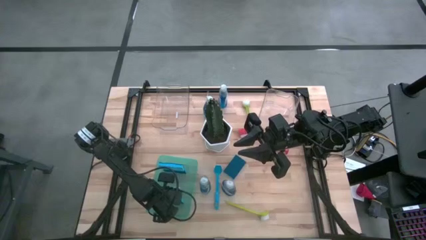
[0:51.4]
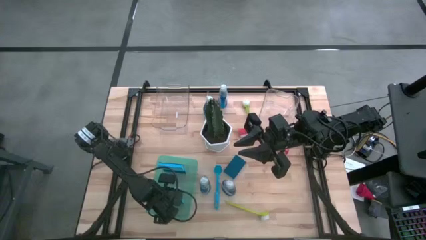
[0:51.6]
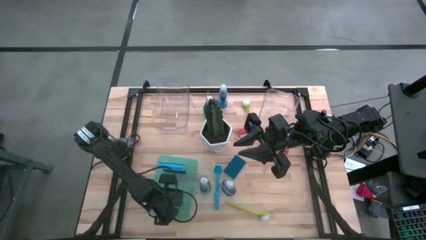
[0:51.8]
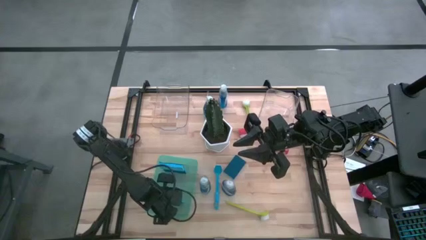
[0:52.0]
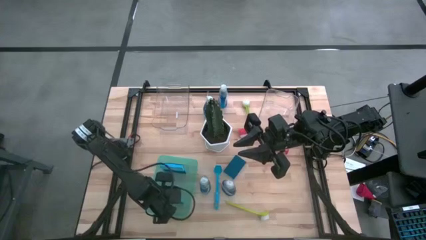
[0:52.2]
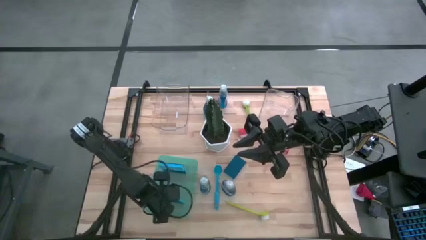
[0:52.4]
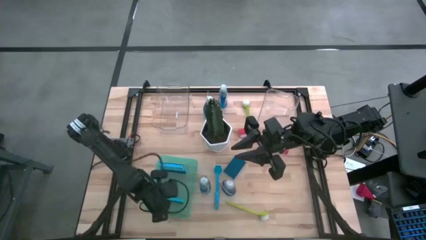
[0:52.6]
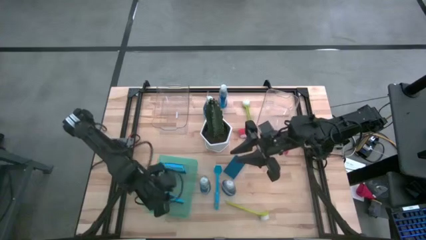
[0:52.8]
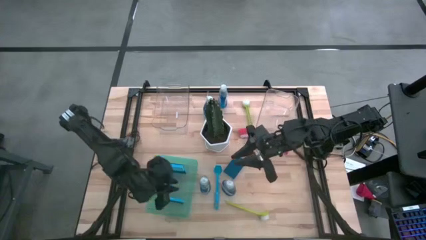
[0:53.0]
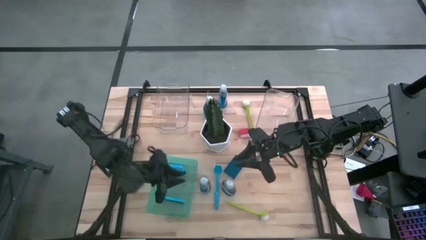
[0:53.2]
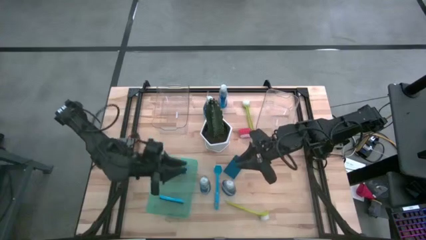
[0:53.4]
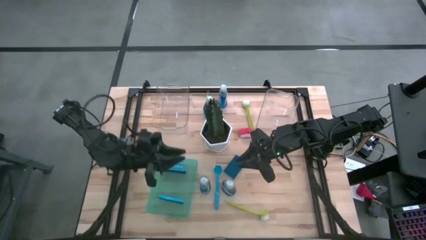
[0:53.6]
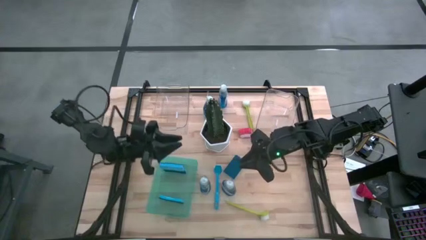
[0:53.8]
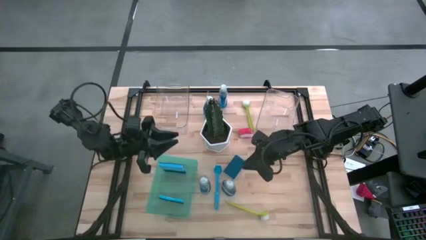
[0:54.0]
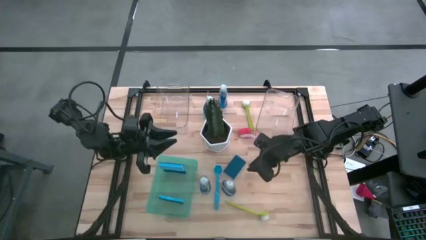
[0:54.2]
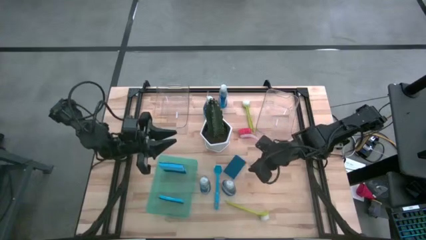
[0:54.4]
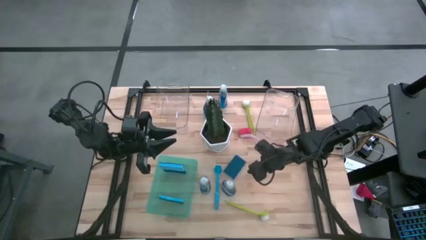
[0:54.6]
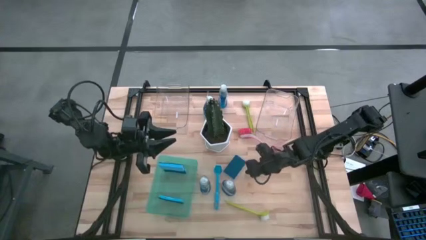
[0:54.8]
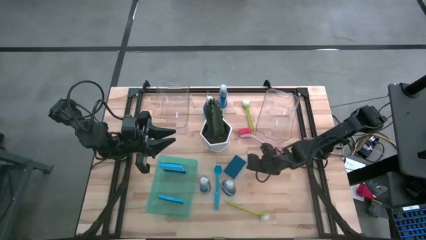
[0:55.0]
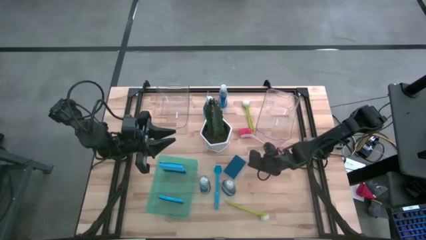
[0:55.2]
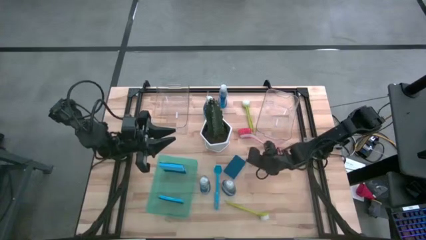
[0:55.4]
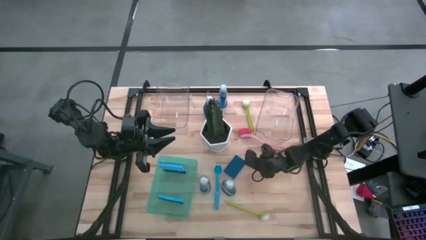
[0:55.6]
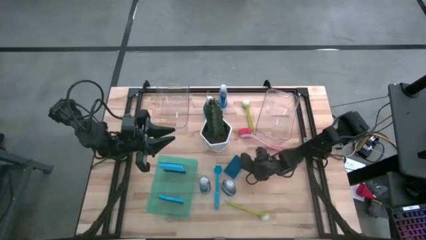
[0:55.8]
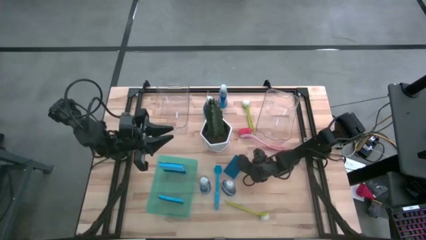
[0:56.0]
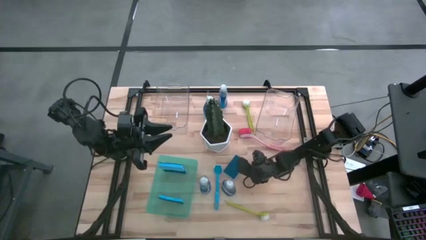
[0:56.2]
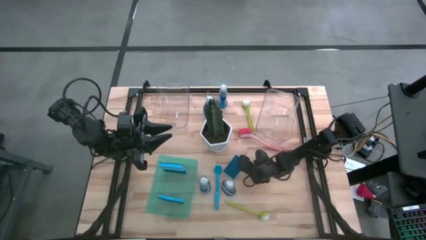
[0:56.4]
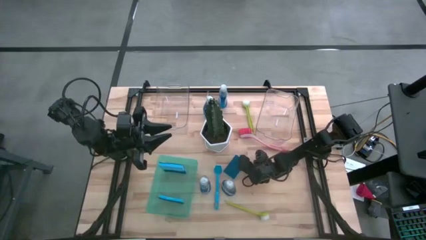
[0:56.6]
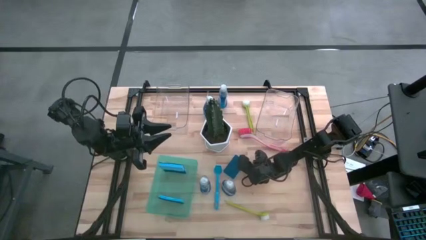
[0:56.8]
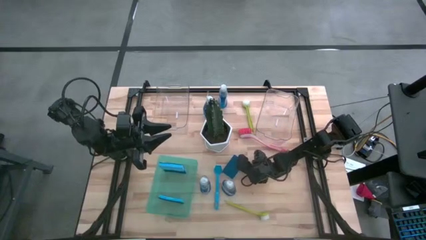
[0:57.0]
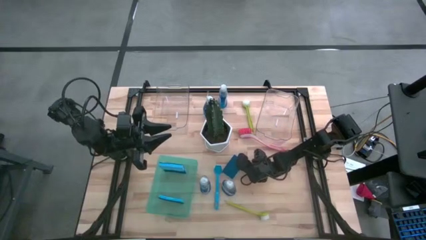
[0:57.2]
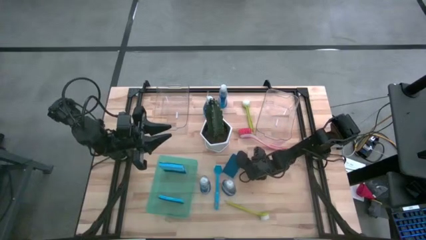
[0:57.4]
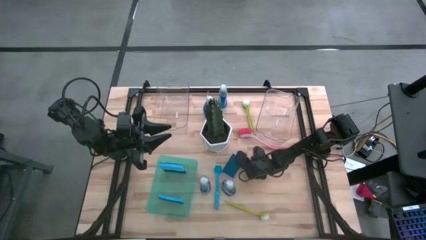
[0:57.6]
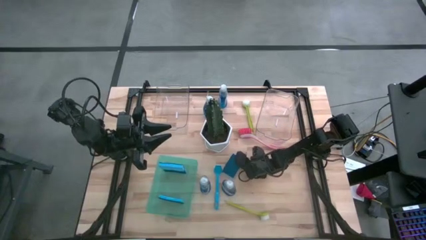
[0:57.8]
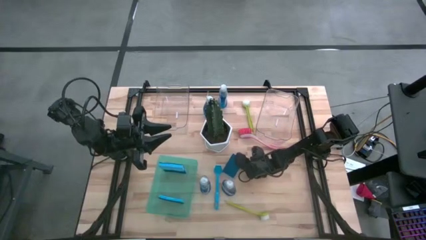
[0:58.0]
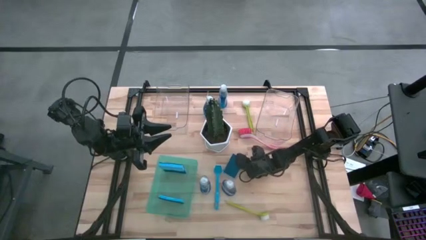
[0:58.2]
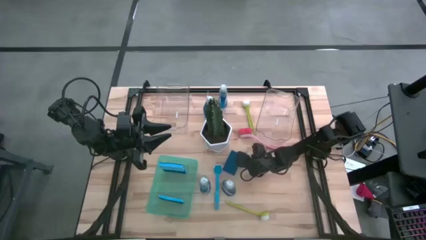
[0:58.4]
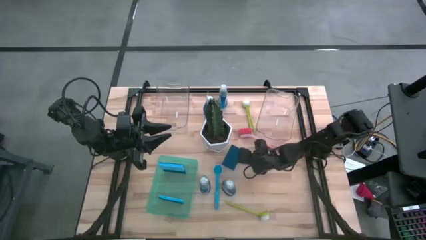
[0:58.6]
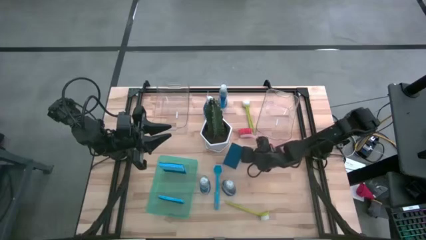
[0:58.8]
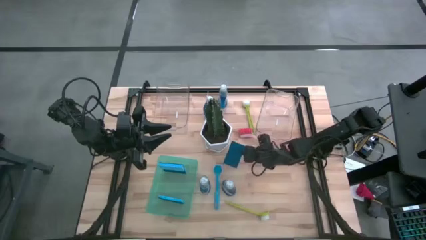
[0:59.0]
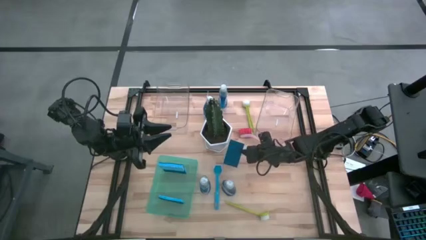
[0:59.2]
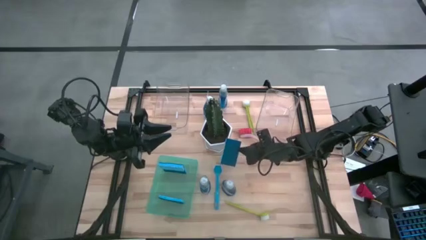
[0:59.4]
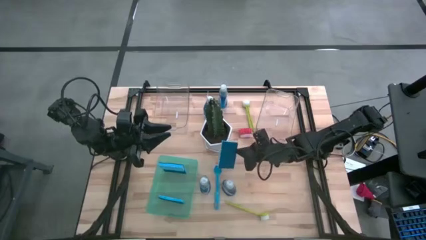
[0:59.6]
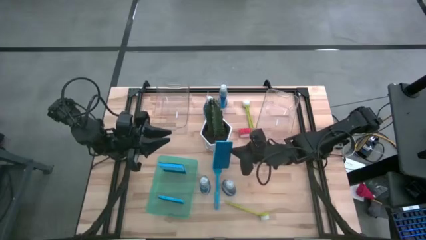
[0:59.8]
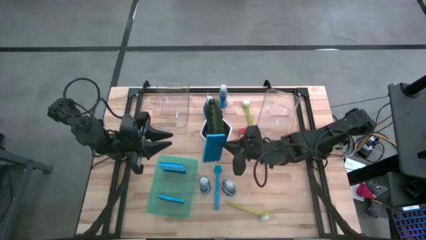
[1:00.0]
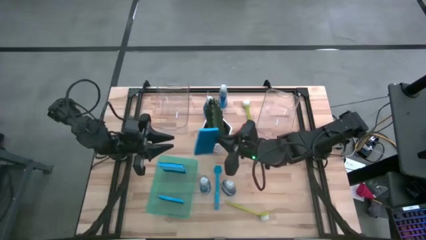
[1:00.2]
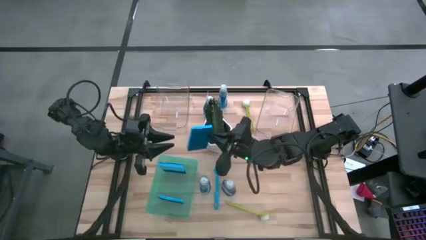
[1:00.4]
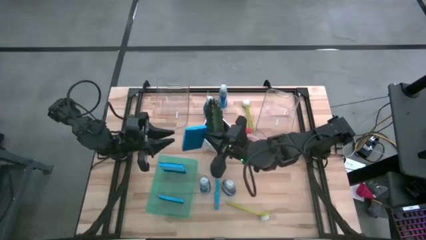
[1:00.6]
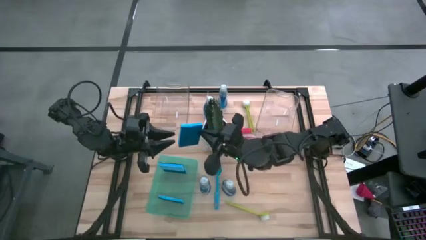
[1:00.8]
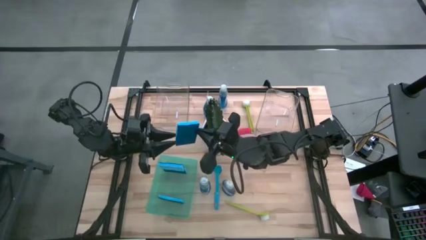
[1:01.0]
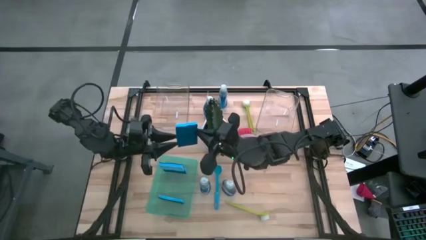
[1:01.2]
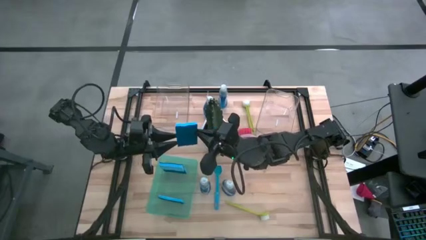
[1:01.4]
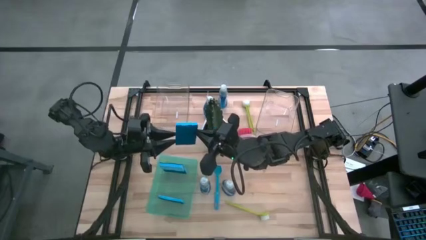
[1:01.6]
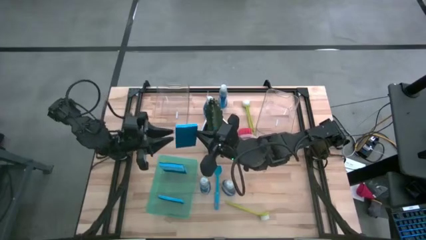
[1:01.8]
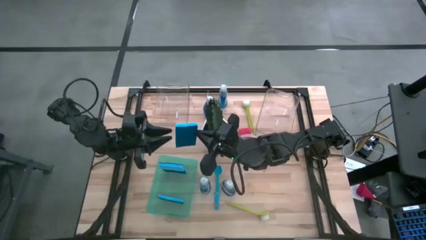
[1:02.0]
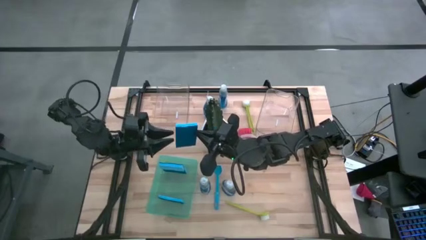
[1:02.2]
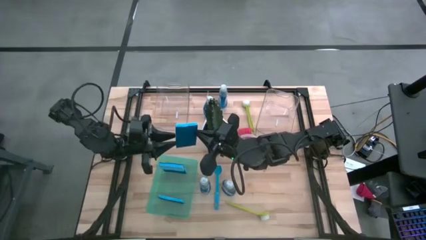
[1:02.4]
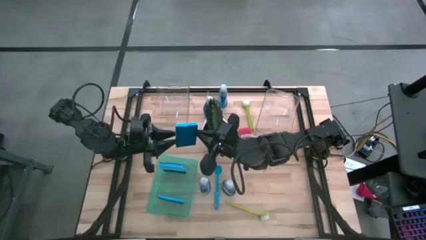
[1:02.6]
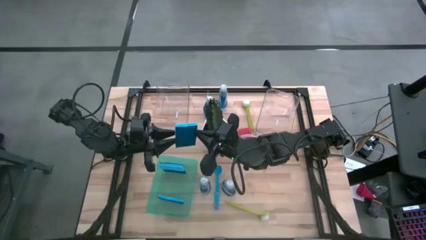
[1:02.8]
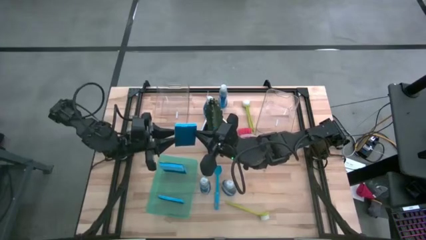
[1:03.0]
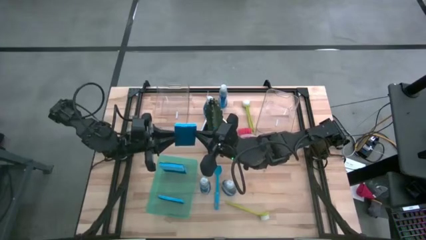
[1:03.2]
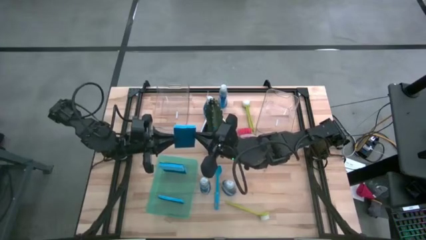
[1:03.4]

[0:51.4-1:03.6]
Task: Pick & Place Kitchen Sink Supplies
Put the blue sponge wipe into the green bin

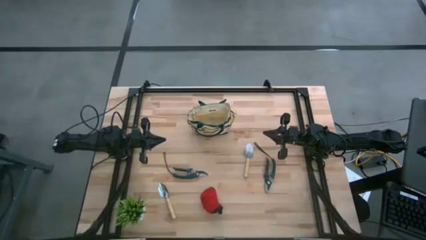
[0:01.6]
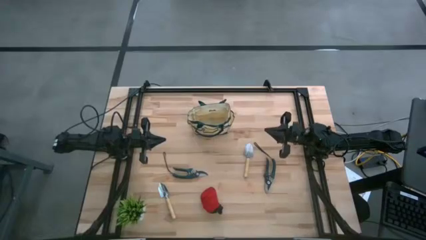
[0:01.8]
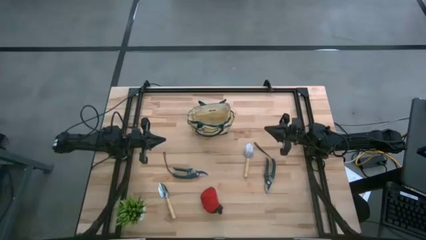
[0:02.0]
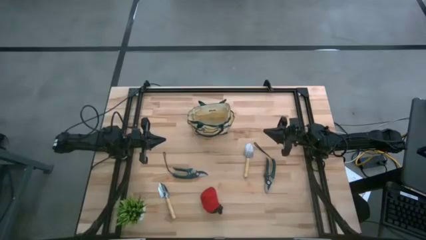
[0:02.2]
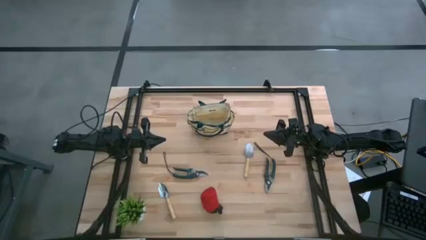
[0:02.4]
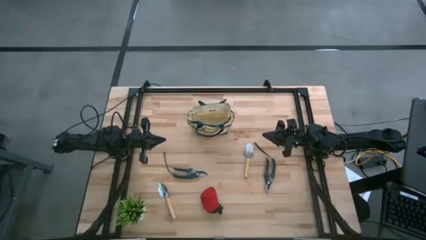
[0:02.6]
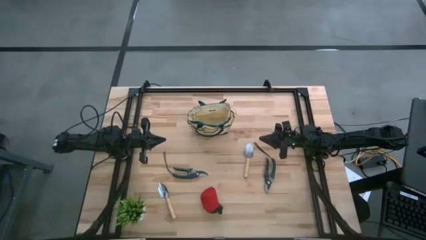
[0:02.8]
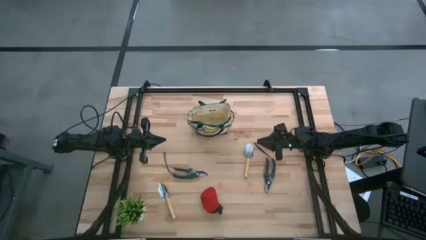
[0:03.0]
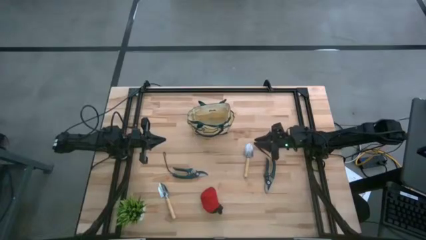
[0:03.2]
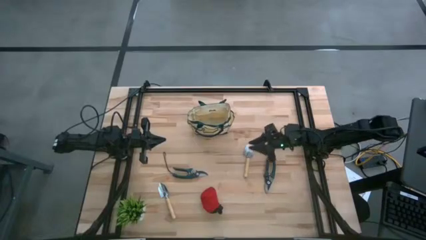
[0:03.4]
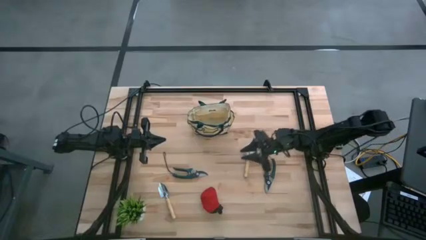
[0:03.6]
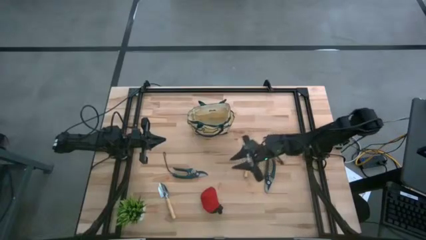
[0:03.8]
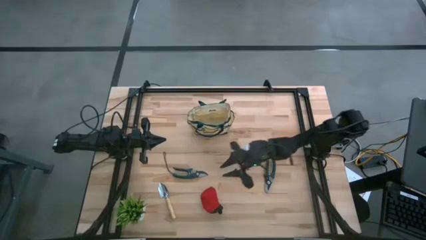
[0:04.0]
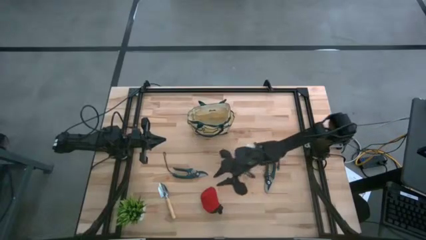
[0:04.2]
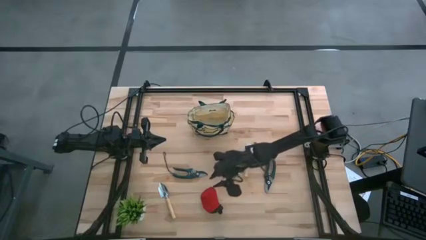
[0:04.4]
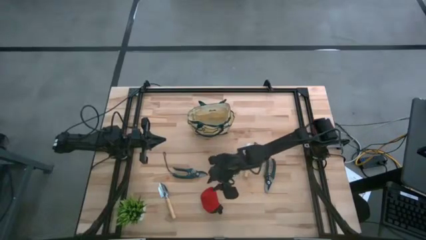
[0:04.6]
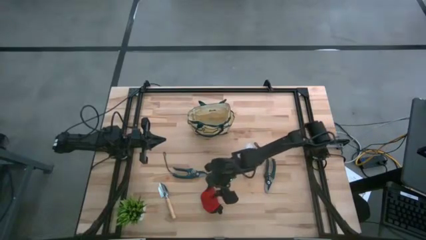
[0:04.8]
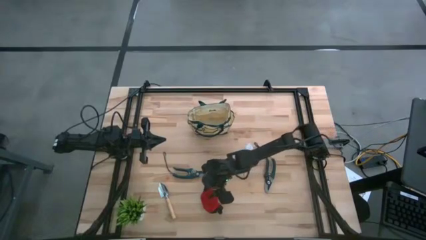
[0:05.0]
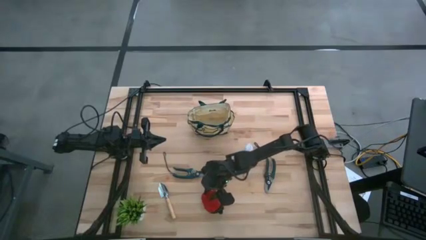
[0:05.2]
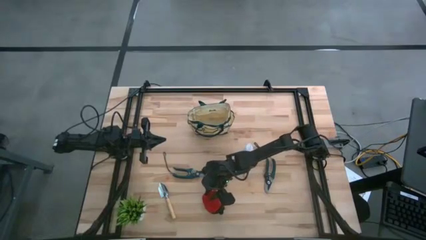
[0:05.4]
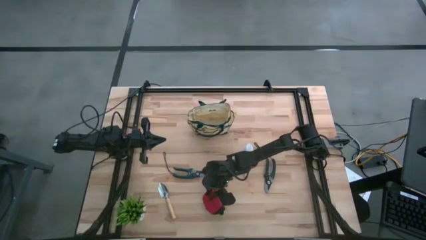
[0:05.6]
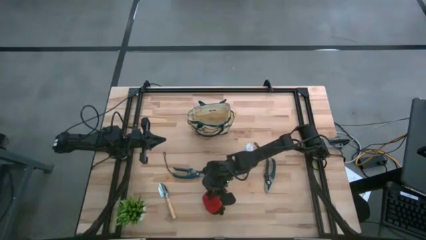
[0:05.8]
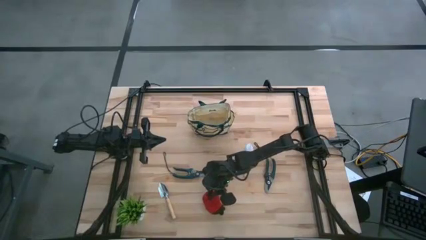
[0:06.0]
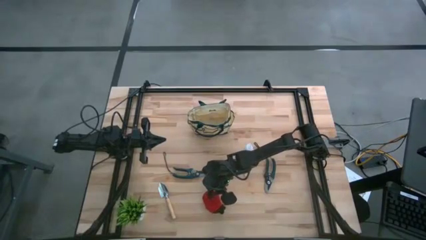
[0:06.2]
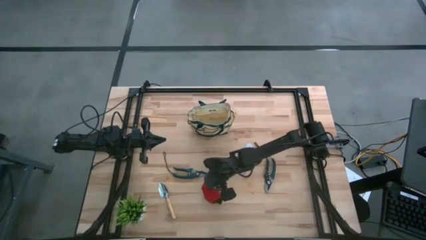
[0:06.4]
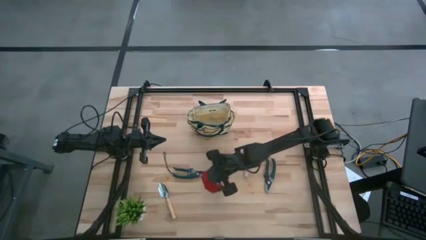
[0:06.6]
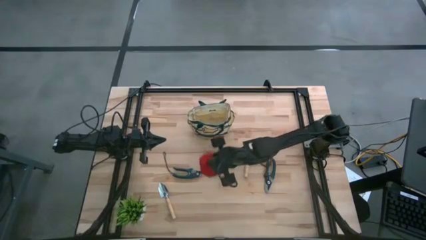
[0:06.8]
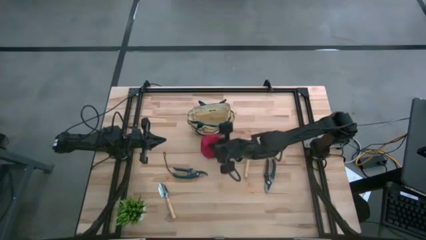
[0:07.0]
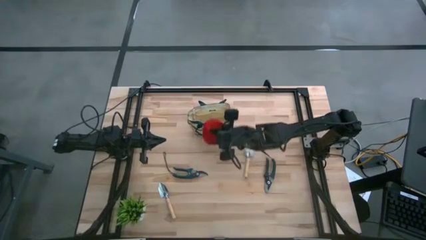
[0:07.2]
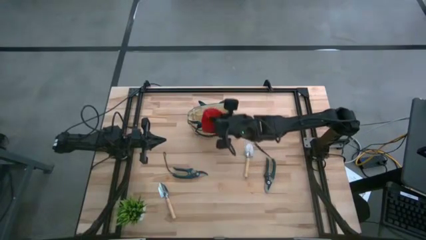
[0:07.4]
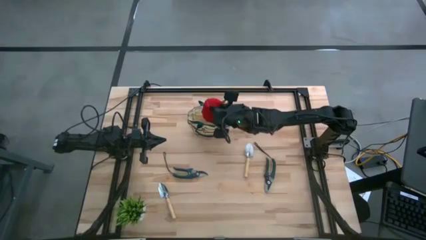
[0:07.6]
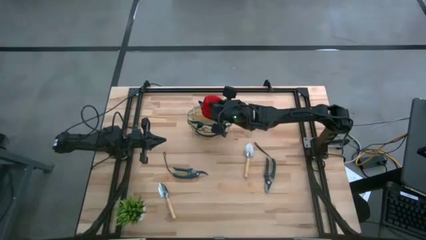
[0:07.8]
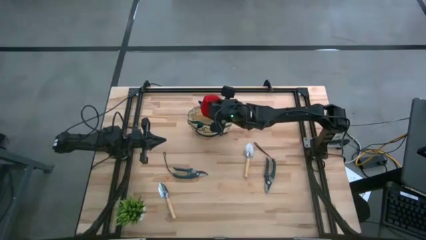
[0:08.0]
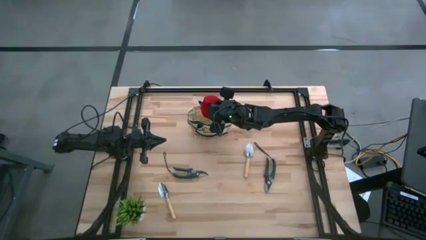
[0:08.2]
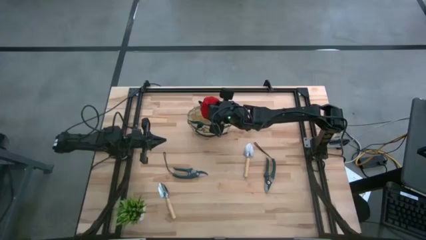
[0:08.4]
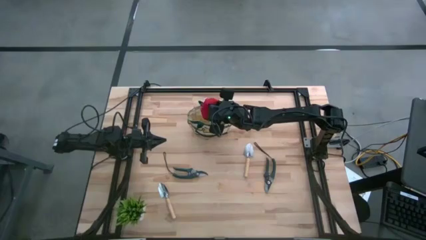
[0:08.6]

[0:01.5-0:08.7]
Task: Pick & Place Garden tools in Gardening bag
Put the red gloves into the brown gardening bag
